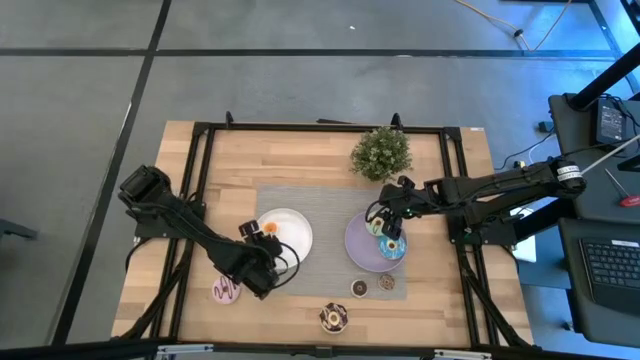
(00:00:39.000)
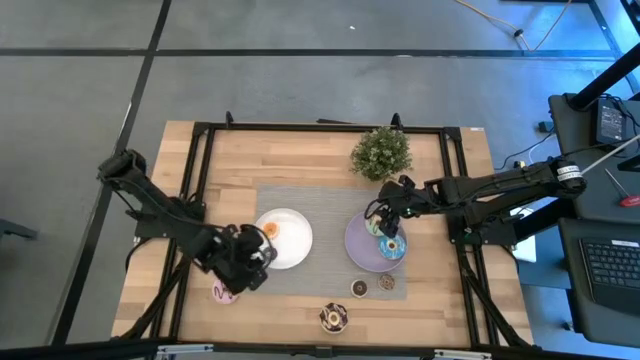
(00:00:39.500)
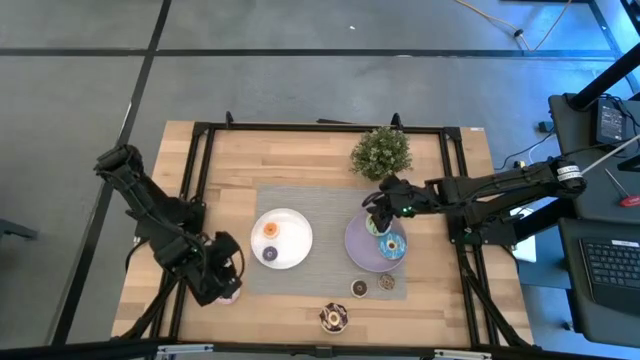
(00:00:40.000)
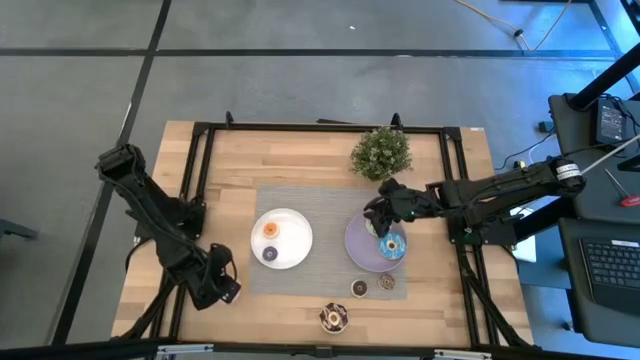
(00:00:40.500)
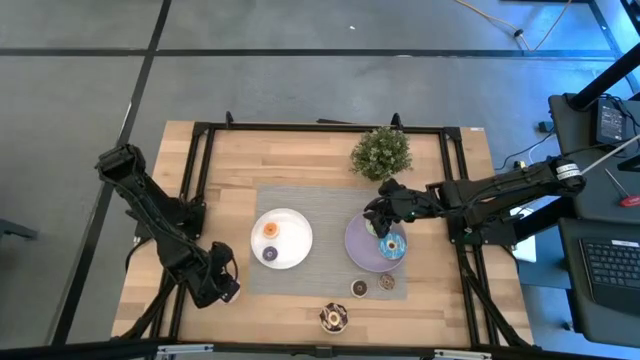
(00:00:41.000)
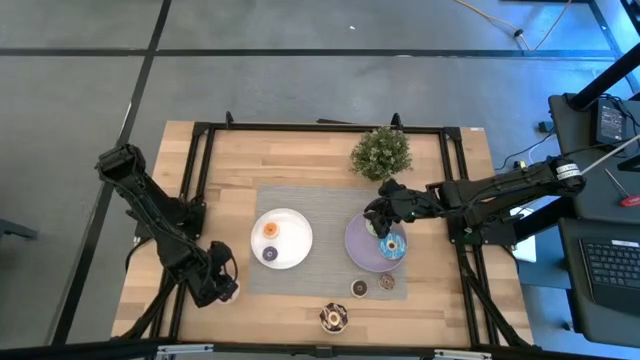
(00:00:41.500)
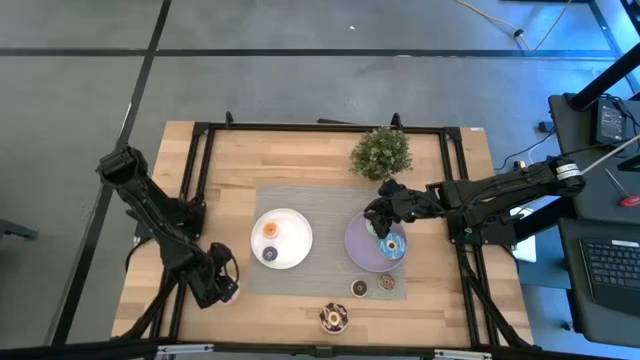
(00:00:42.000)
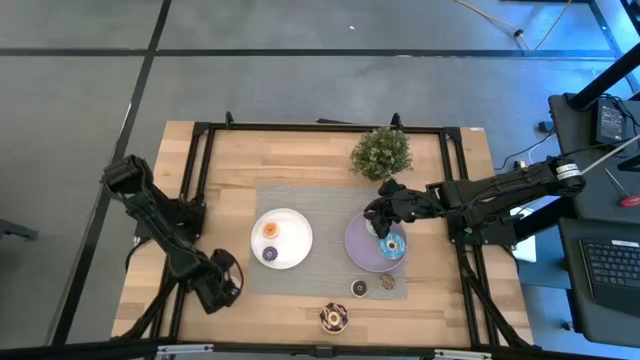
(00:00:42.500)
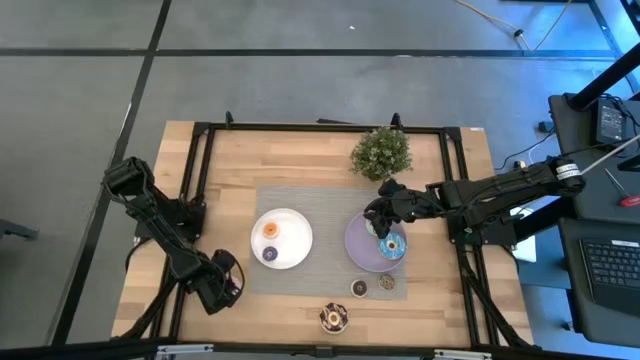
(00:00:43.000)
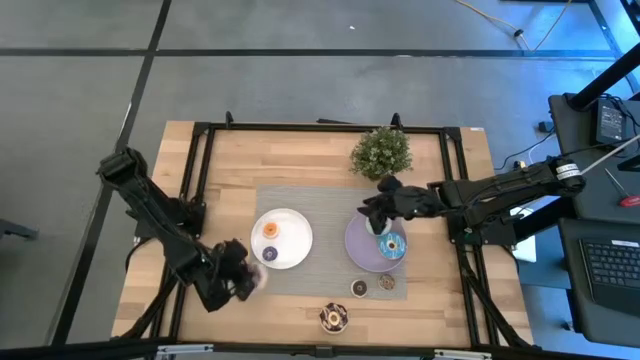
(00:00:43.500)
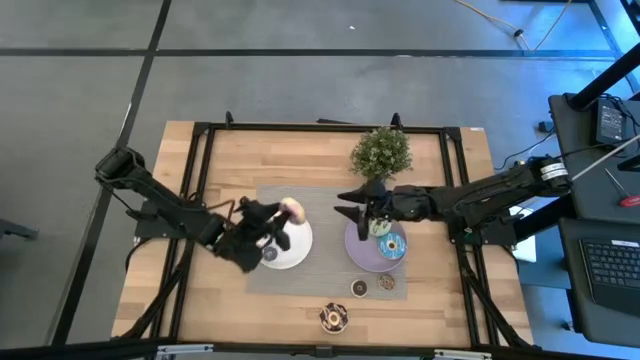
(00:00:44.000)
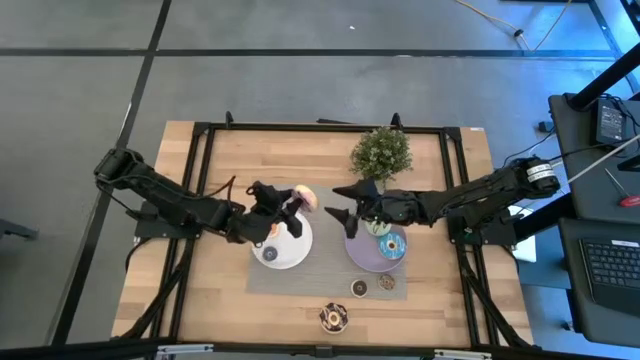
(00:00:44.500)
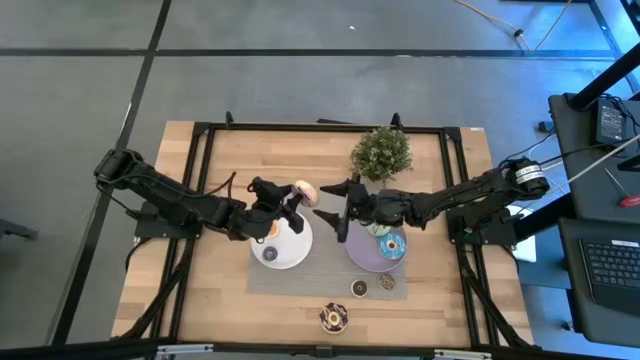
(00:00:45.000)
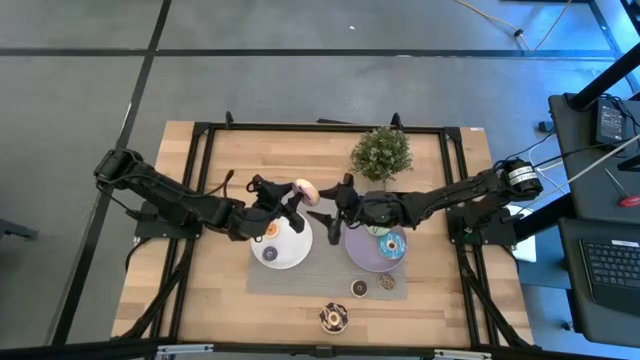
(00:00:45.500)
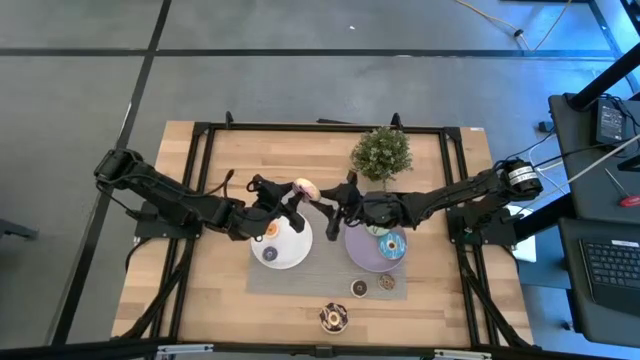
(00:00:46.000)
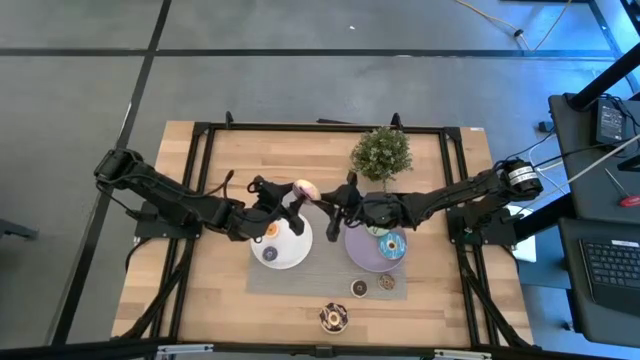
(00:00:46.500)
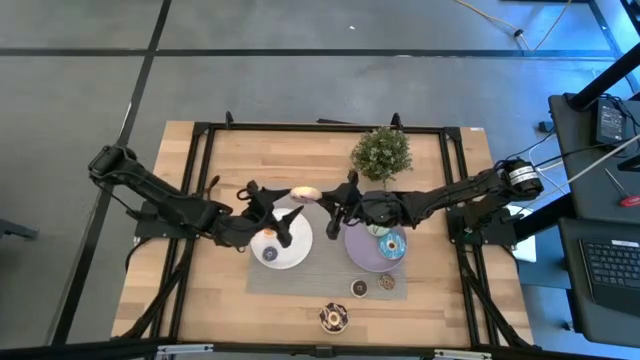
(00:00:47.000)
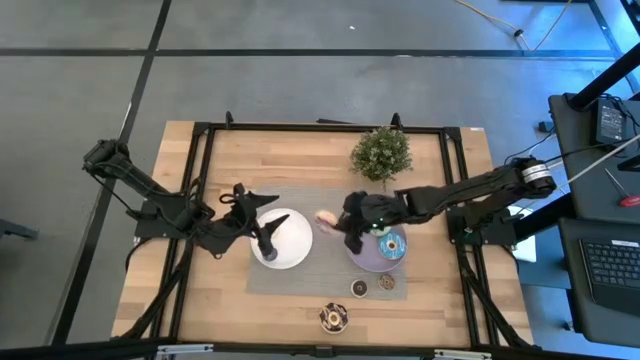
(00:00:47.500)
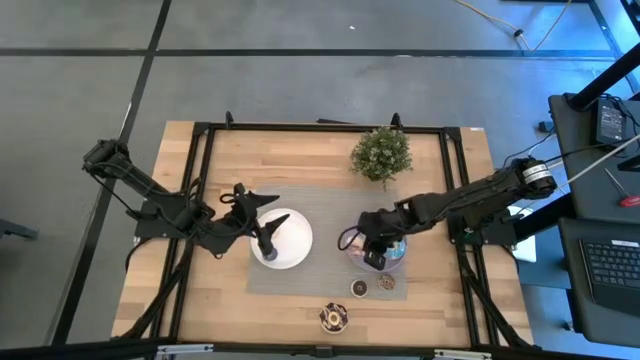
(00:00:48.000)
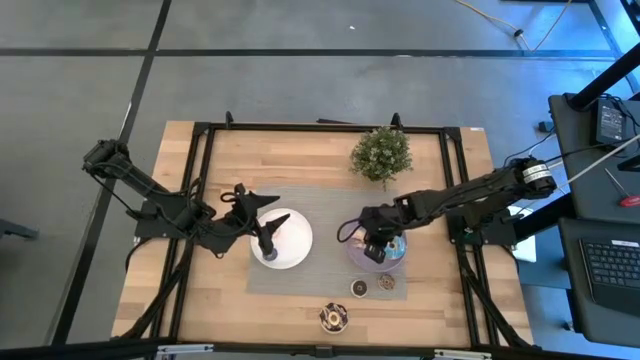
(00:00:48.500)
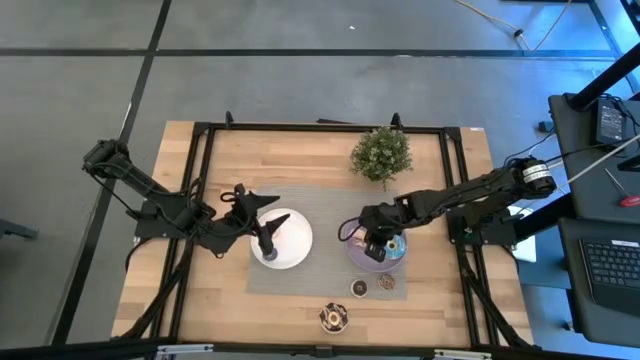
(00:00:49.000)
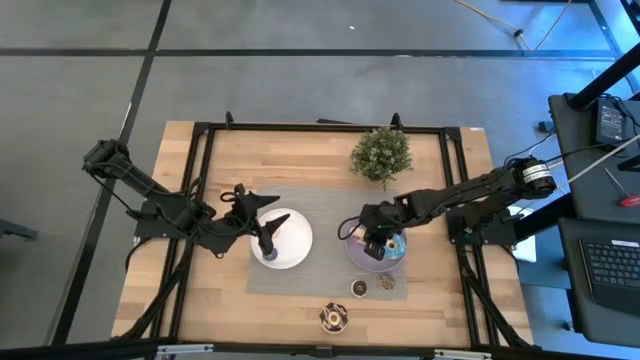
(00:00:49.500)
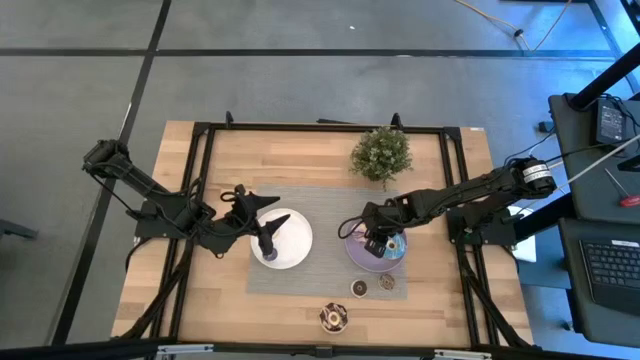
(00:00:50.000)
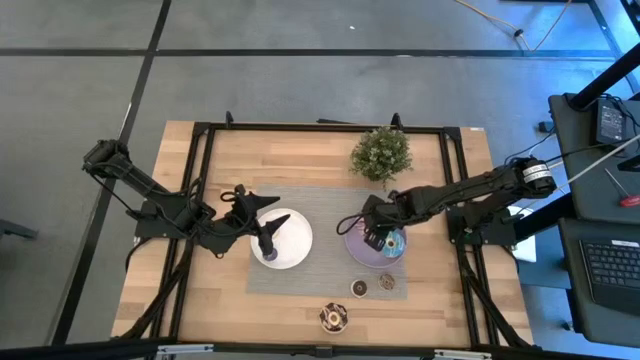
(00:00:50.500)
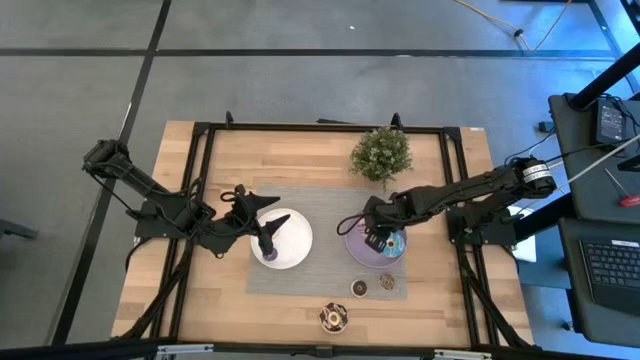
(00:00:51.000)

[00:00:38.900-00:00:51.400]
Task: Pick & Place donuts
Put the big purple donut on the purple plate

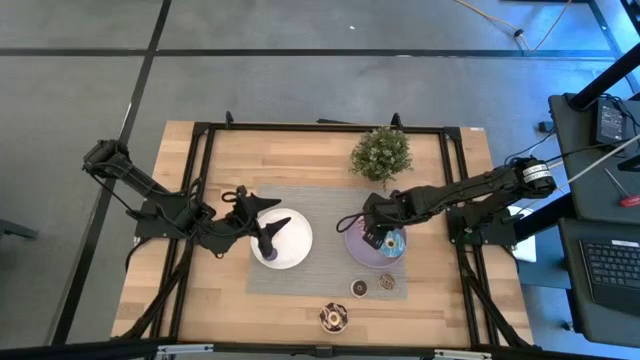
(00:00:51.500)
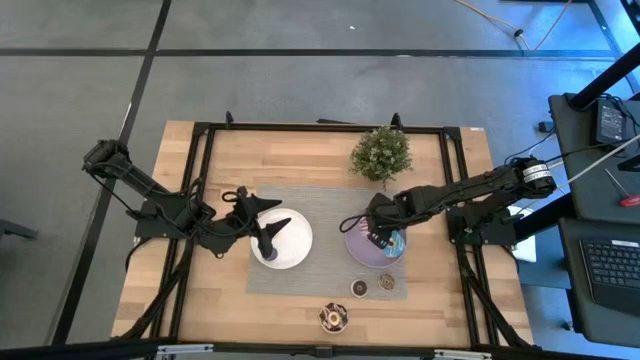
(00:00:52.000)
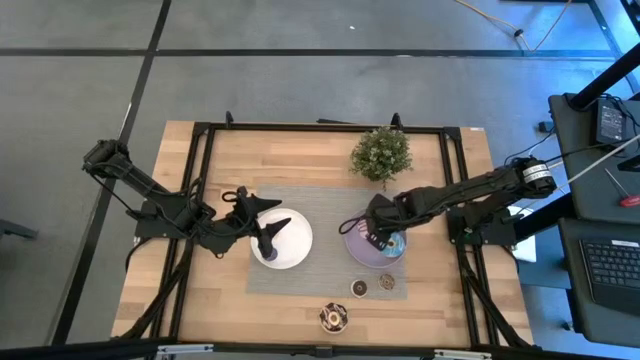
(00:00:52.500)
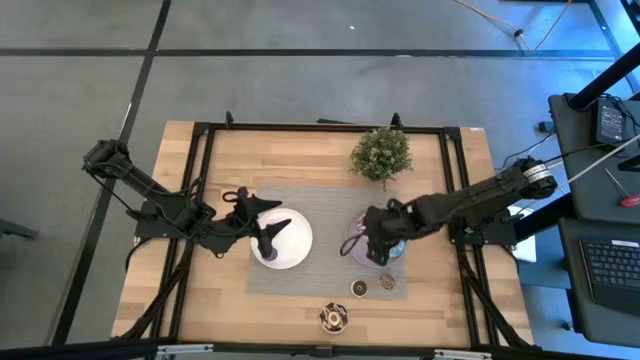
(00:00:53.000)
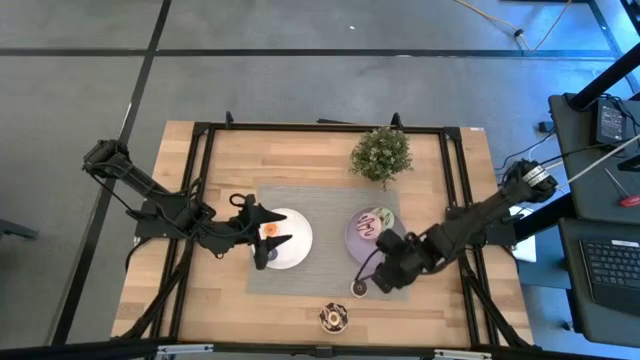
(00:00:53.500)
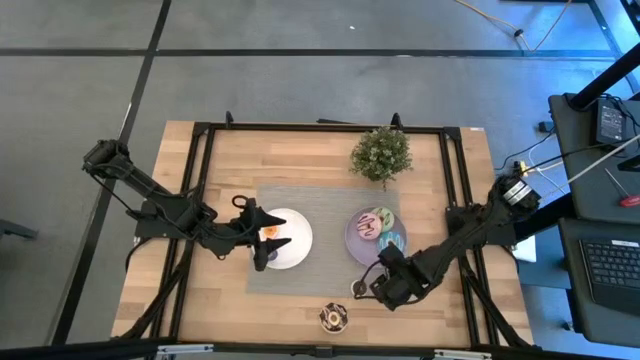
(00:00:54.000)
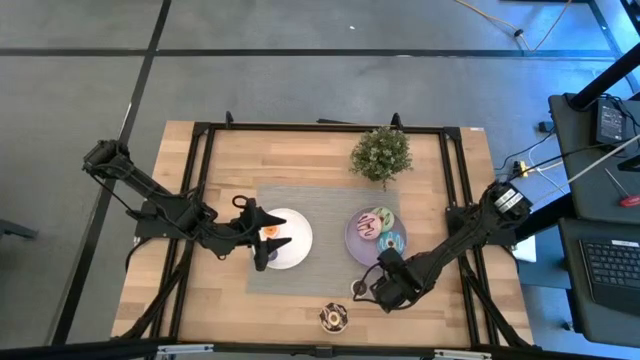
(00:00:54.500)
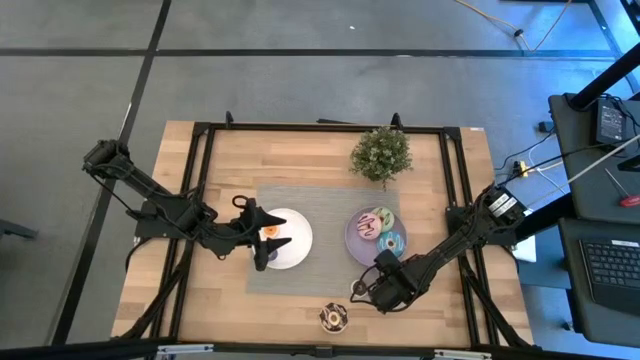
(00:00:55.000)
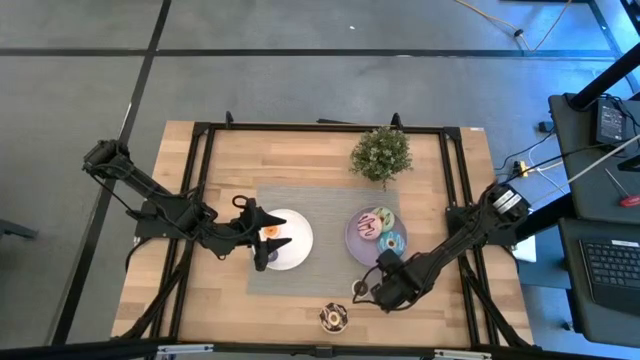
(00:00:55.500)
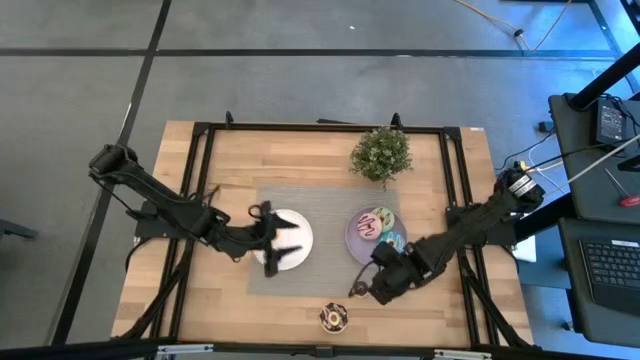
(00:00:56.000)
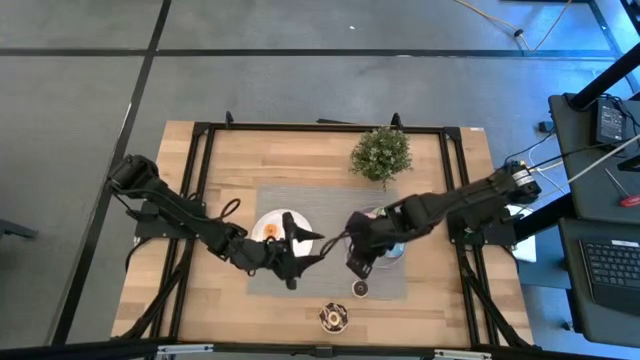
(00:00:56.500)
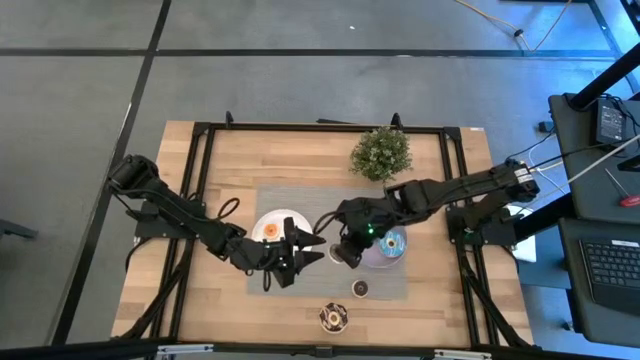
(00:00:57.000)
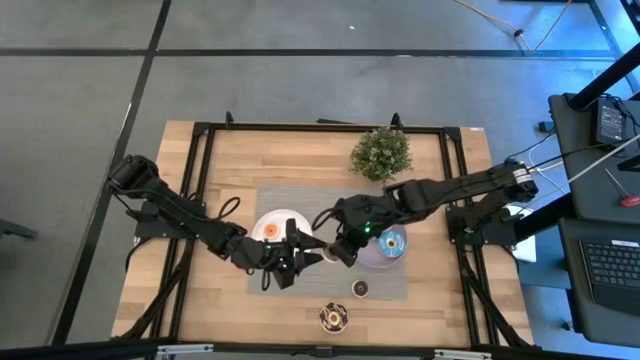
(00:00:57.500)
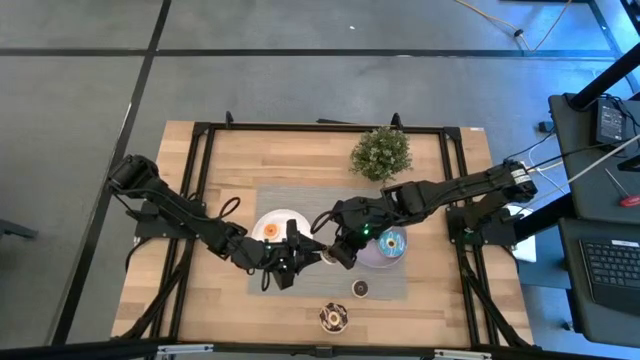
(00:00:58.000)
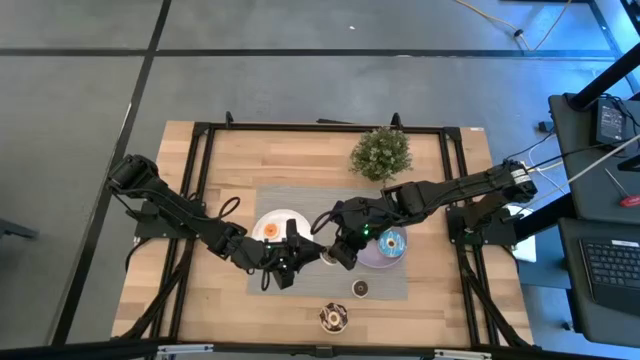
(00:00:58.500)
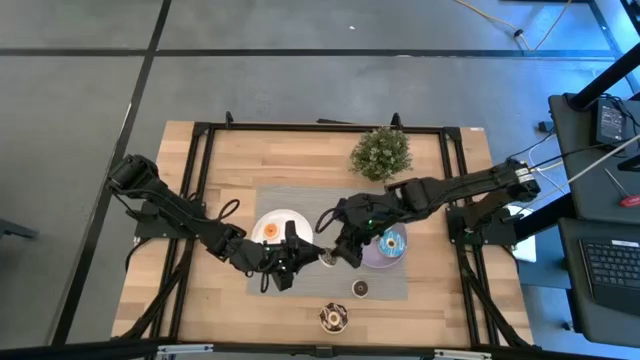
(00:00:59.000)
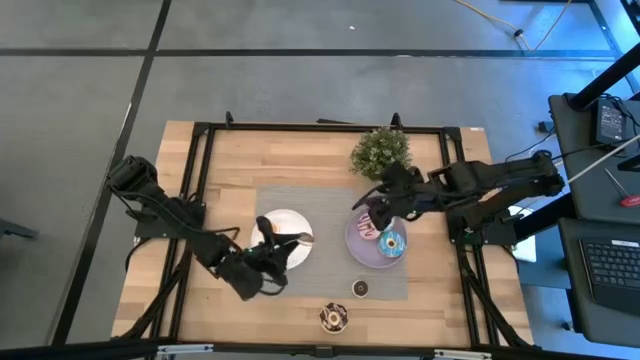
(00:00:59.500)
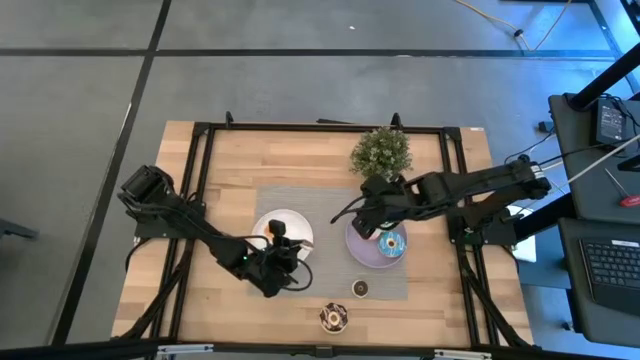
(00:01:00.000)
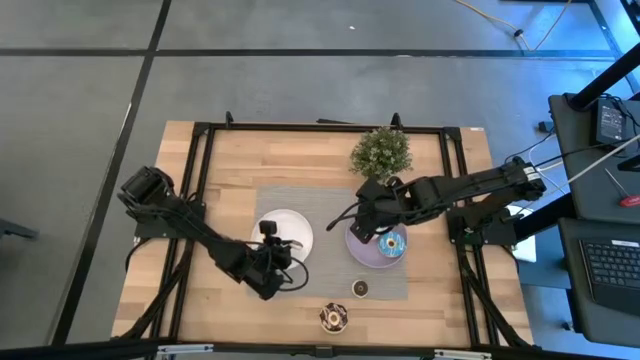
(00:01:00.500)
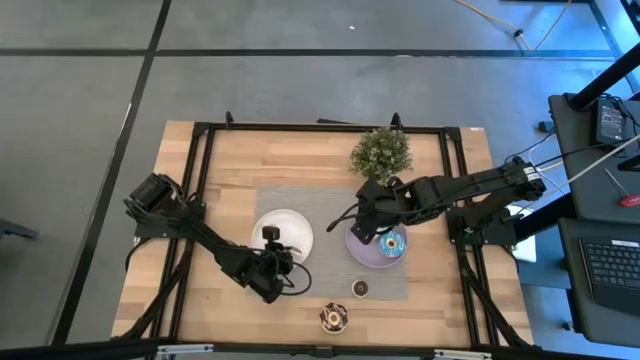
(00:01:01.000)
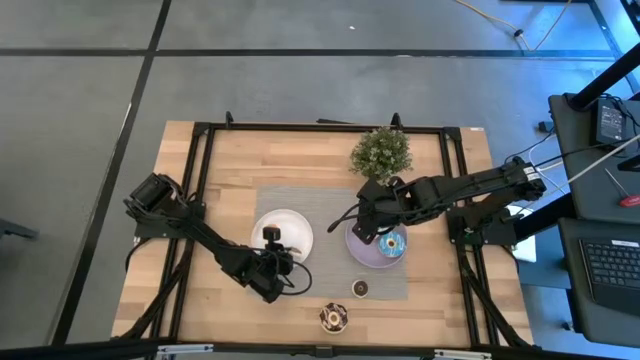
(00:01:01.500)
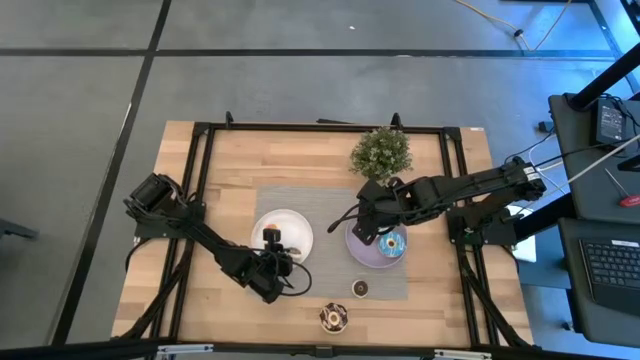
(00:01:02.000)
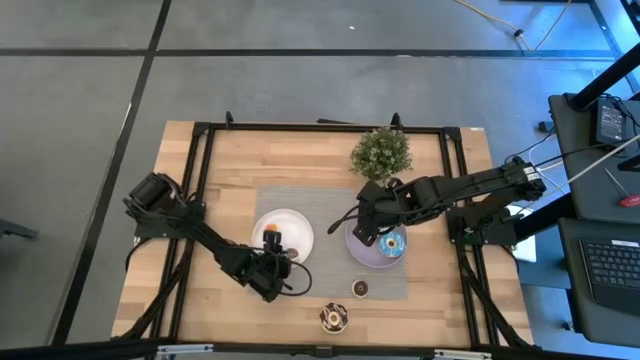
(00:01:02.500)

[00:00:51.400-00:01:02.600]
Put the small brown donut on the white plate
